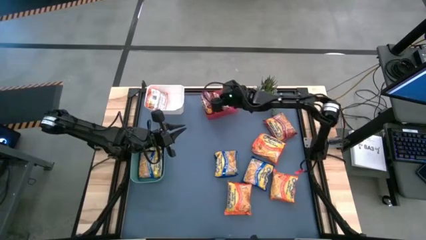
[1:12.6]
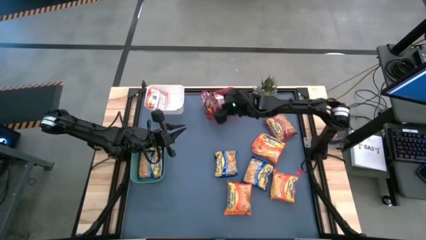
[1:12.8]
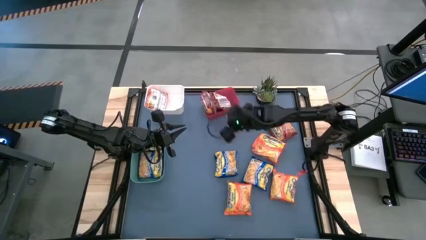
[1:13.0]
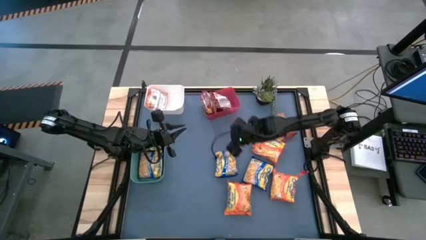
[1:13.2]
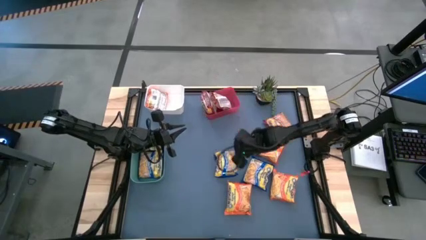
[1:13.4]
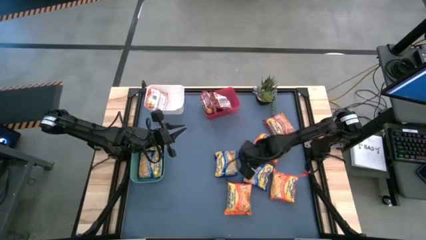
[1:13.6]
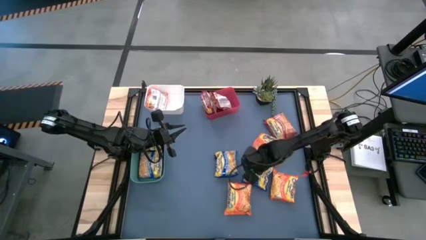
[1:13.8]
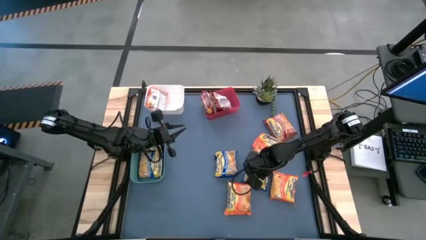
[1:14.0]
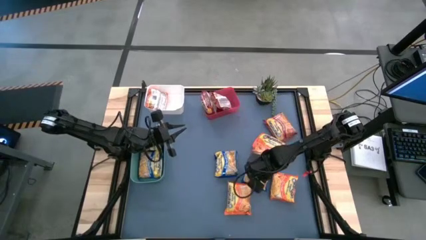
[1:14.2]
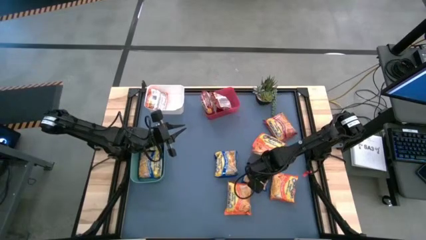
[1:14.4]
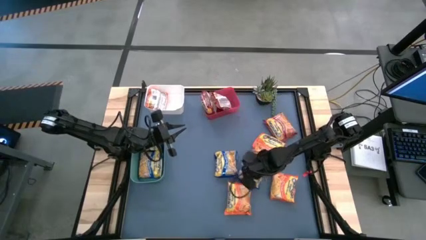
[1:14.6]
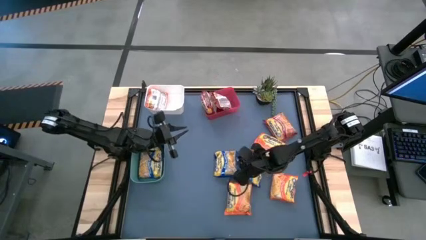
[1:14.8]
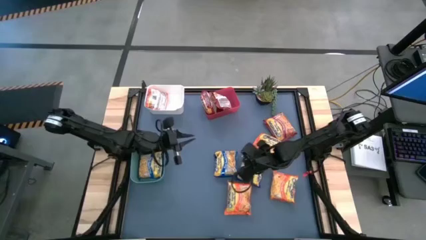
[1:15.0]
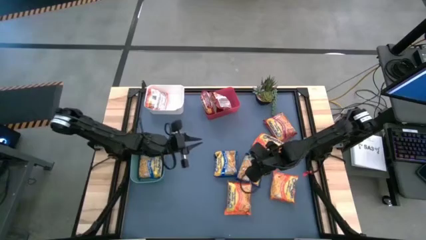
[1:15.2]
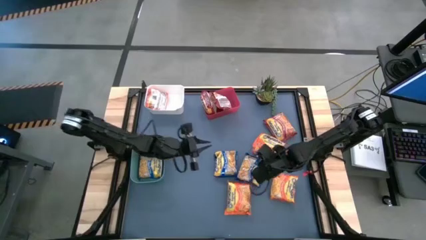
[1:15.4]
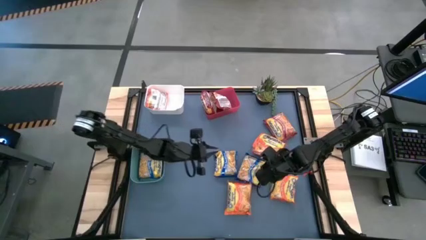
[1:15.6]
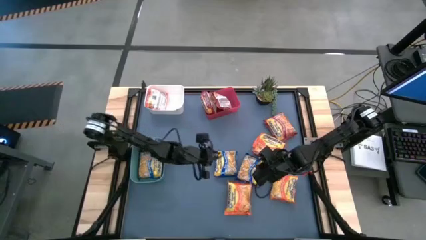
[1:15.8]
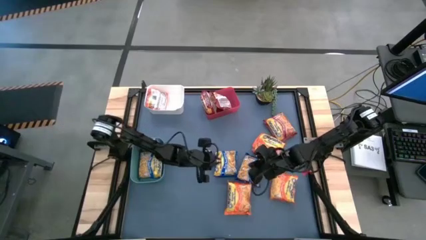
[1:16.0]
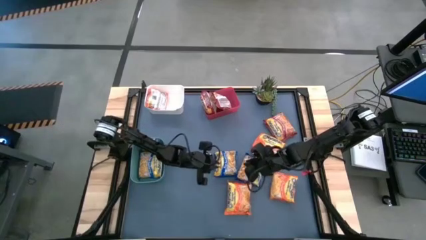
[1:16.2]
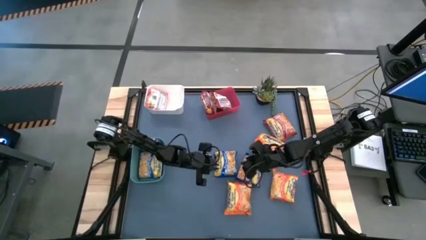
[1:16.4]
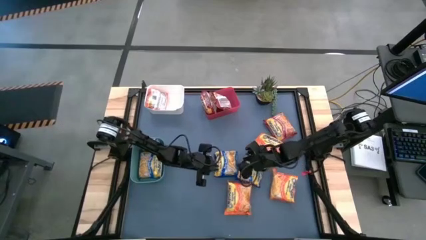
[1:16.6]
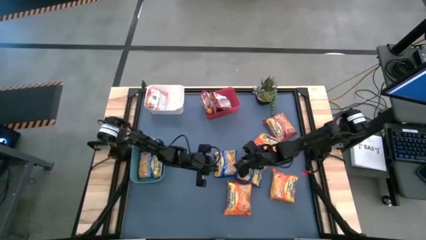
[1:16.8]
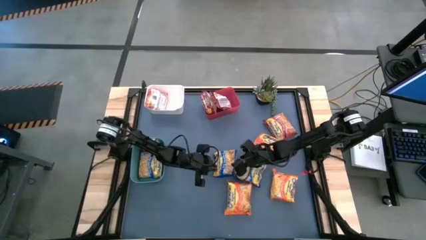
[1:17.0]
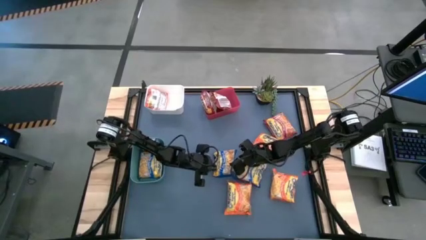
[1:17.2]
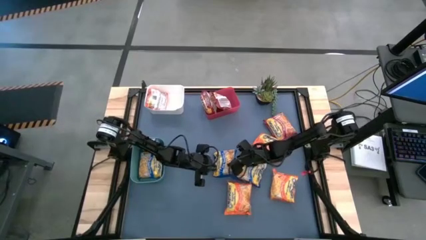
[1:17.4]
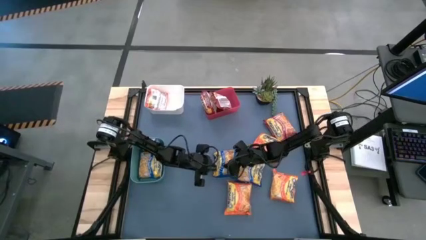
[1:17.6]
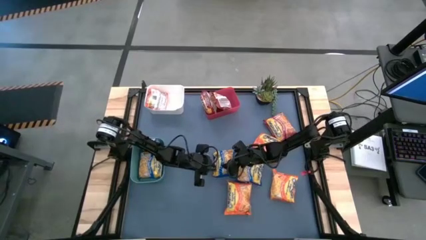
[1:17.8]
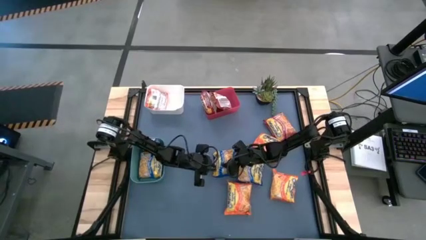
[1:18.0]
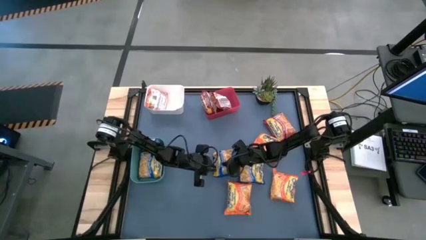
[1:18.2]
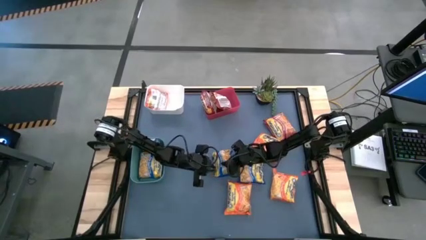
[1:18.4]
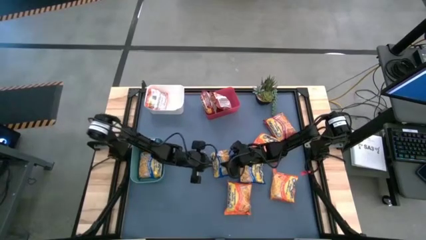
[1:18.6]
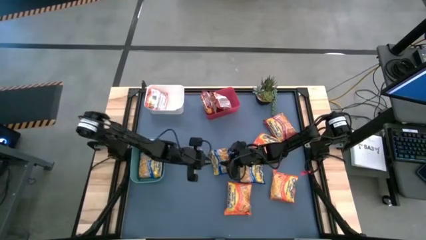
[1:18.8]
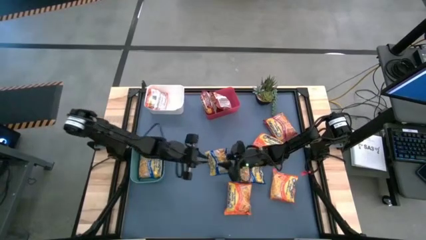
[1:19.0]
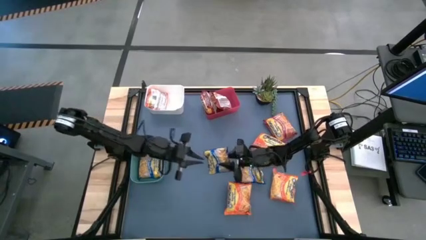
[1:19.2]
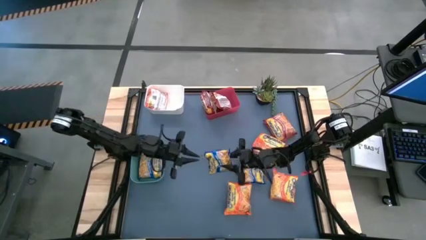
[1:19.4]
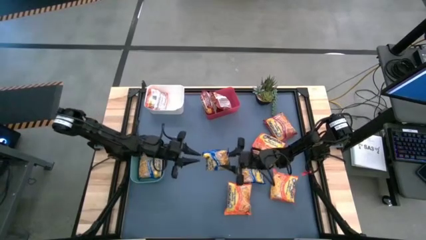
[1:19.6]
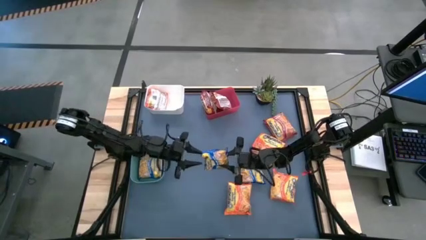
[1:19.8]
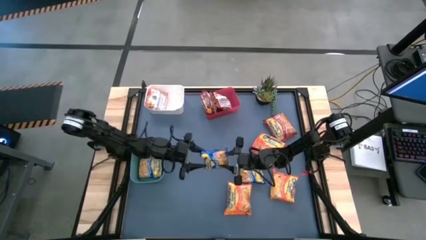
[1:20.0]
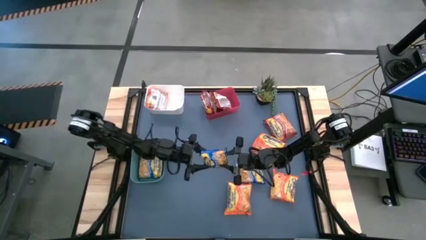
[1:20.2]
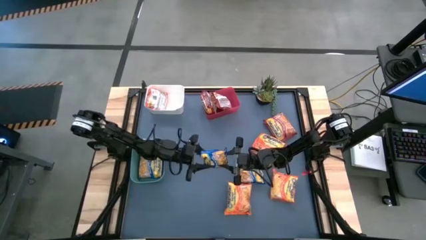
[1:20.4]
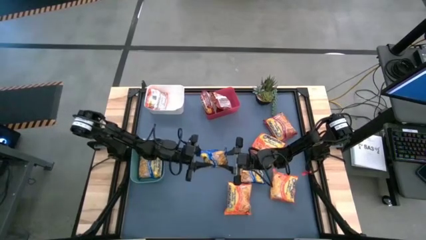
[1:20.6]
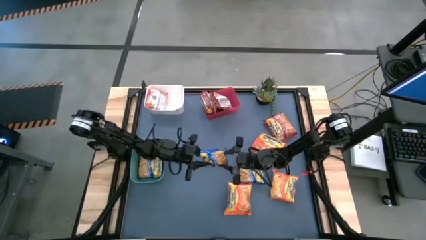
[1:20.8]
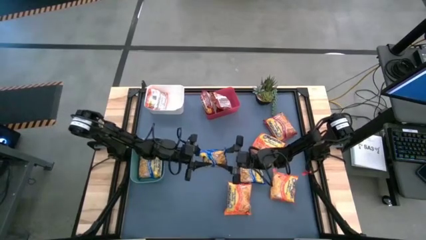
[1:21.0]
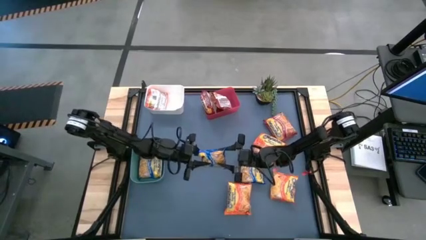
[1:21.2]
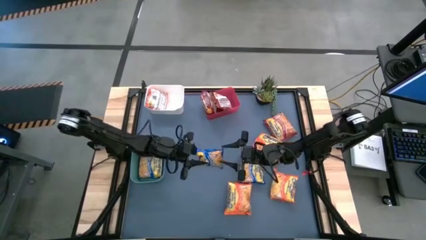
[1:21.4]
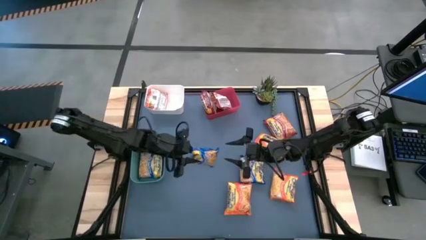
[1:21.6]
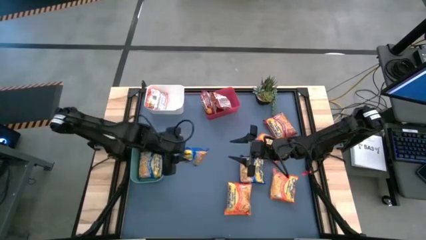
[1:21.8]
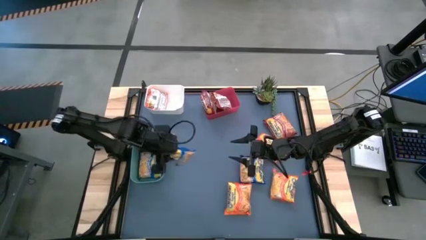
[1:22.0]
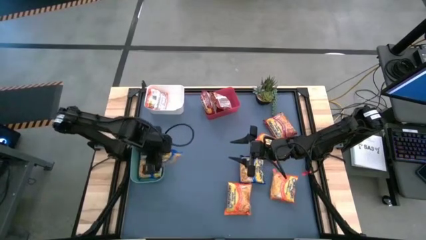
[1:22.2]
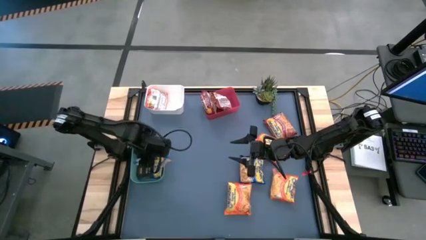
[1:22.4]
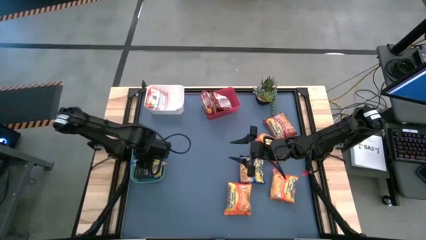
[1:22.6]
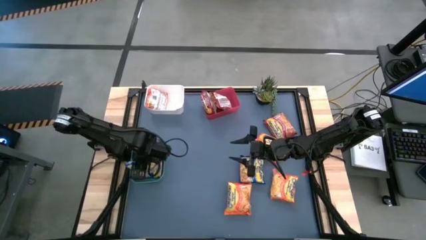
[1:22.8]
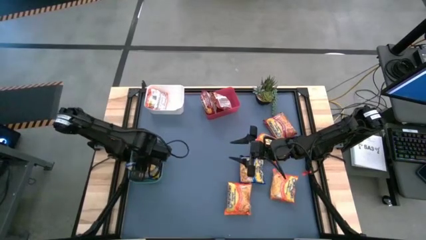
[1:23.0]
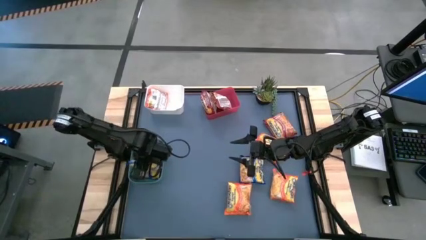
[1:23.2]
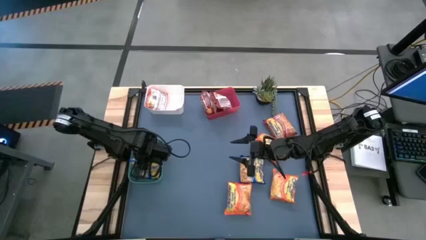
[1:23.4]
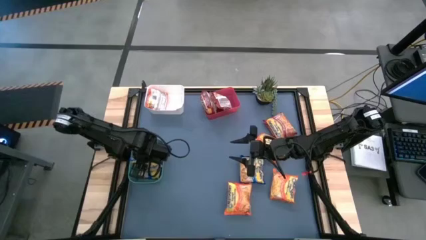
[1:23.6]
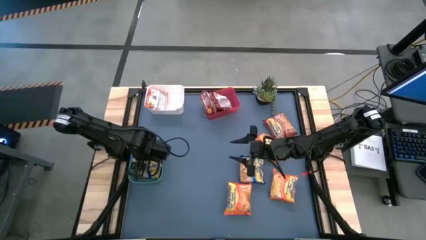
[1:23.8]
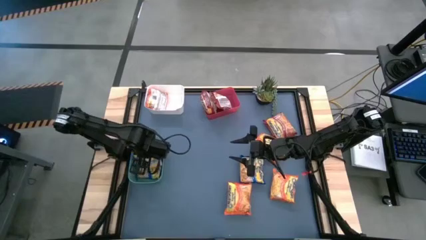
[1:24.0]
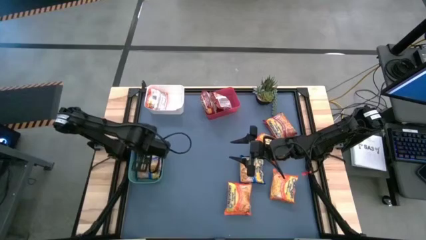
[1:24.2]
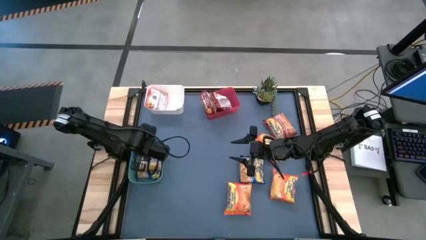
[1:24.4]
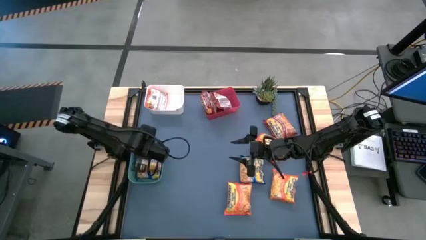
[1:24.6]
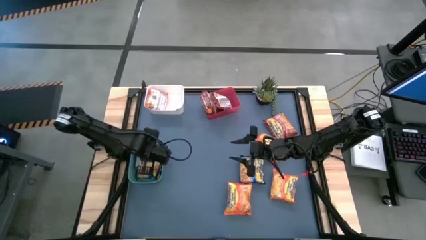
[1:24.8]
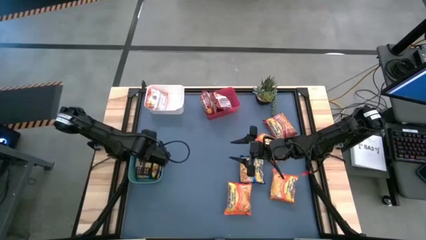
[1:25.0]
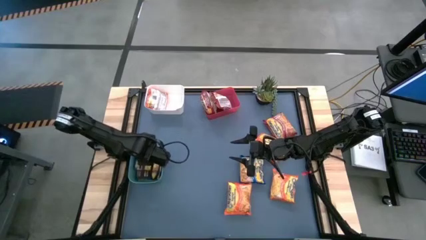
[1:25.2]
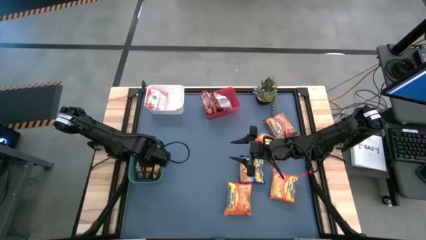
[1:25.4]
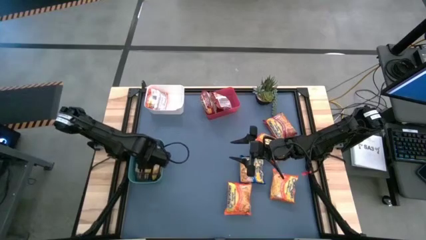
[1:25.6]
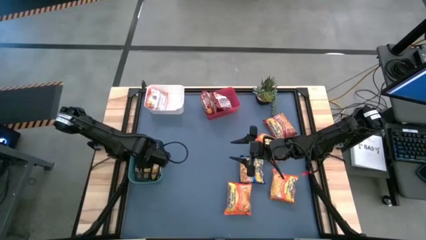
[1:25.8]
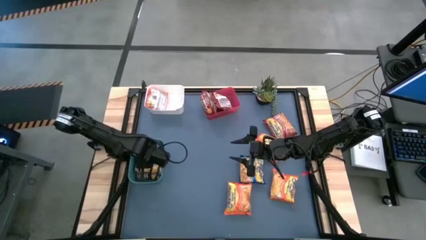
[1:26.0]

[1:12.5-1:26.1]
Task: Sort Maruchan noodles
Stack the blue noodle pack on top of the blue noodle pack
